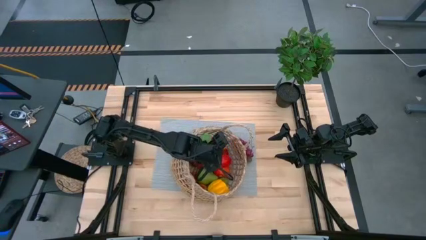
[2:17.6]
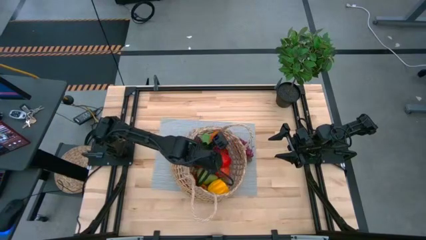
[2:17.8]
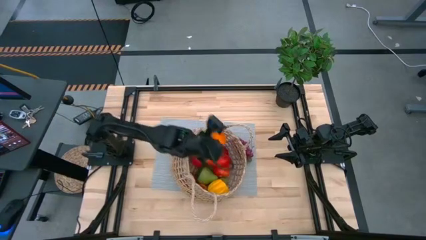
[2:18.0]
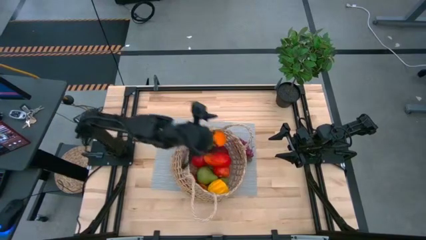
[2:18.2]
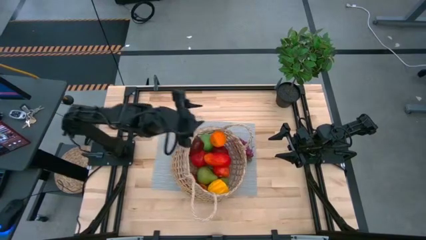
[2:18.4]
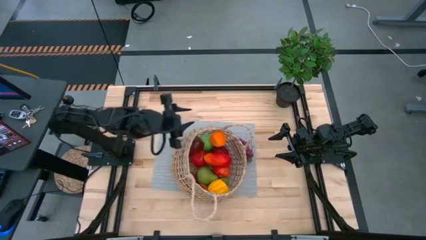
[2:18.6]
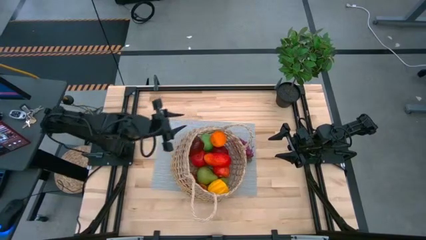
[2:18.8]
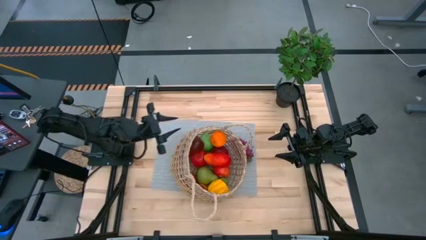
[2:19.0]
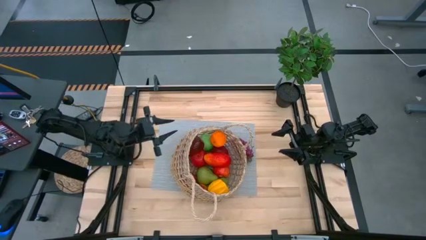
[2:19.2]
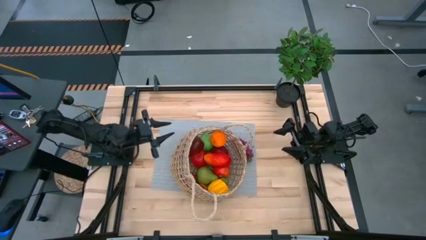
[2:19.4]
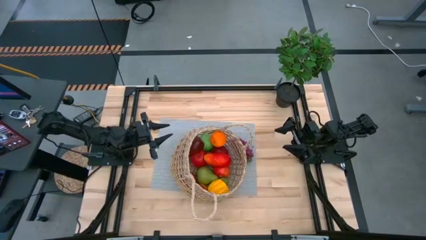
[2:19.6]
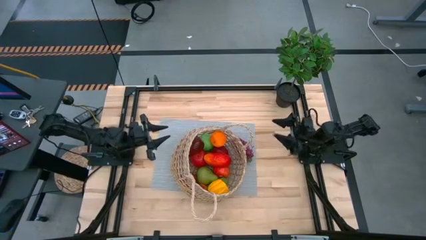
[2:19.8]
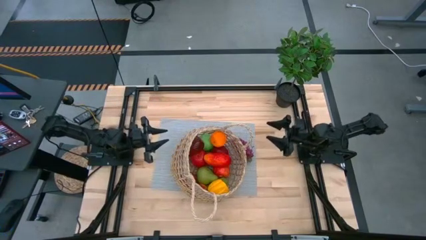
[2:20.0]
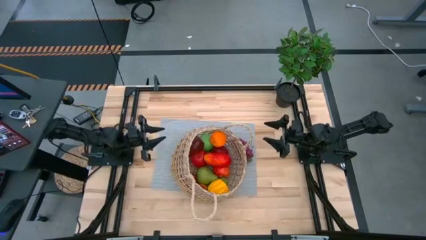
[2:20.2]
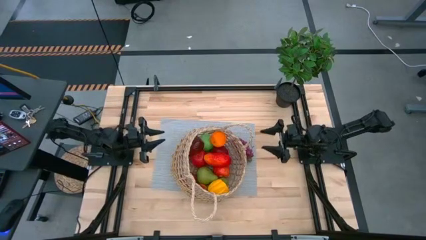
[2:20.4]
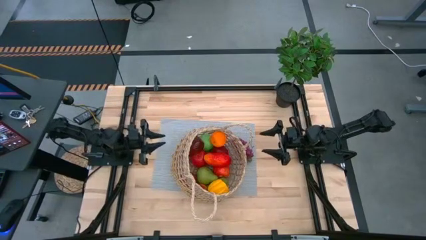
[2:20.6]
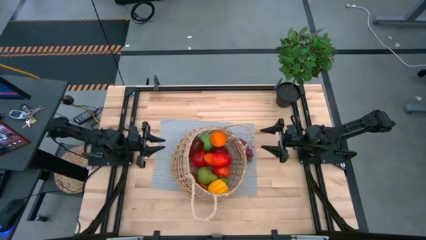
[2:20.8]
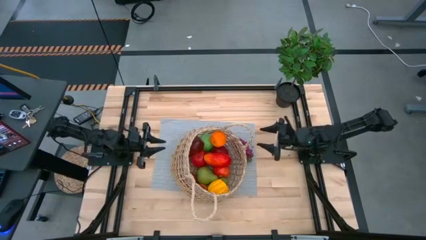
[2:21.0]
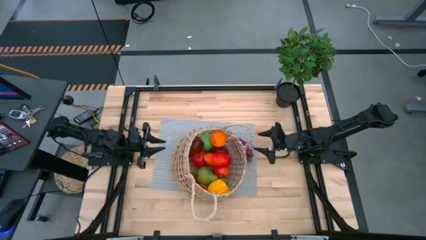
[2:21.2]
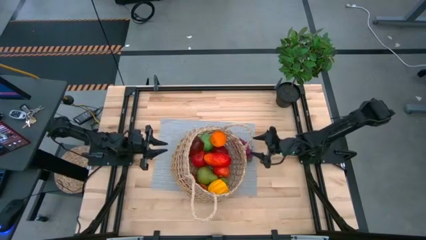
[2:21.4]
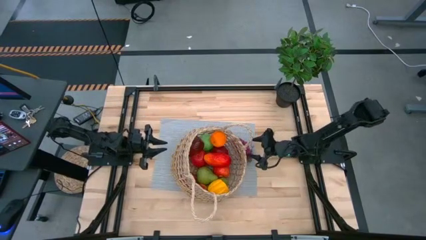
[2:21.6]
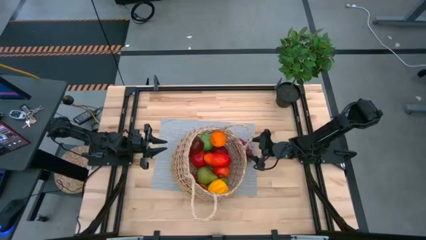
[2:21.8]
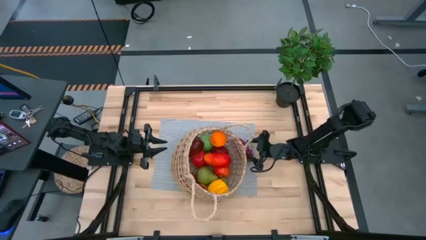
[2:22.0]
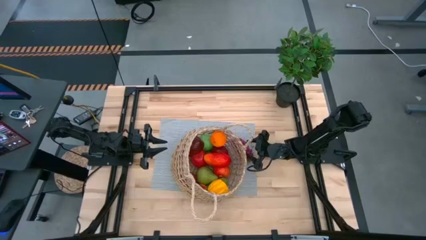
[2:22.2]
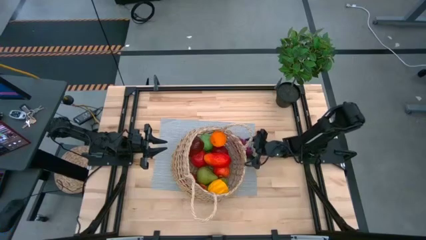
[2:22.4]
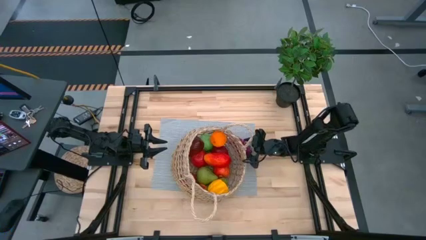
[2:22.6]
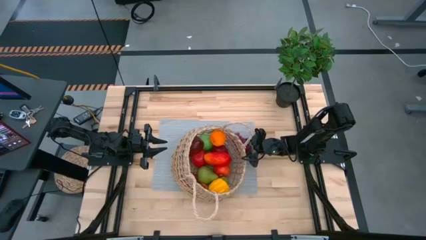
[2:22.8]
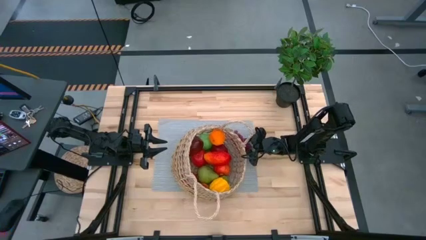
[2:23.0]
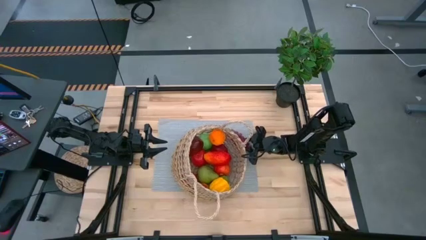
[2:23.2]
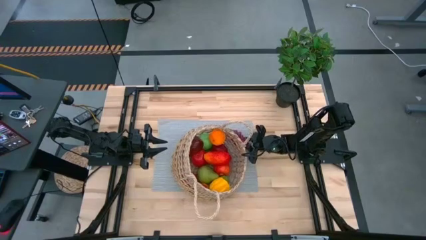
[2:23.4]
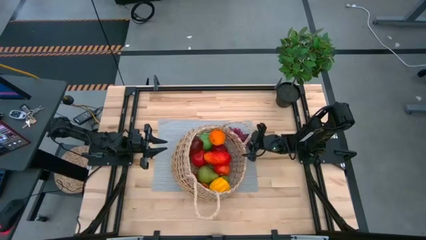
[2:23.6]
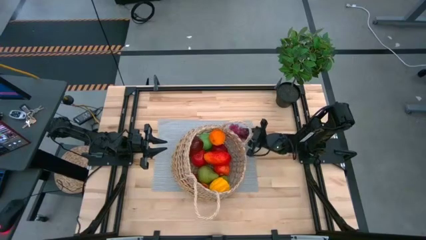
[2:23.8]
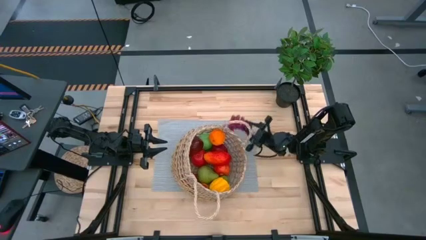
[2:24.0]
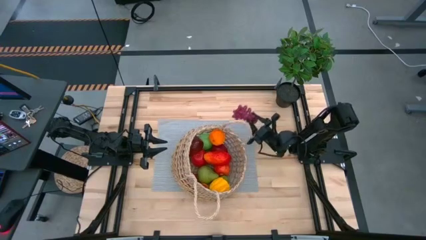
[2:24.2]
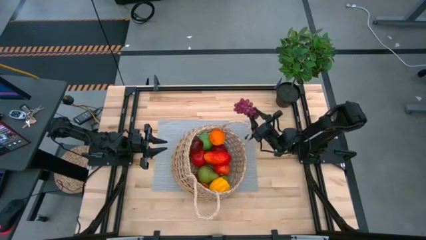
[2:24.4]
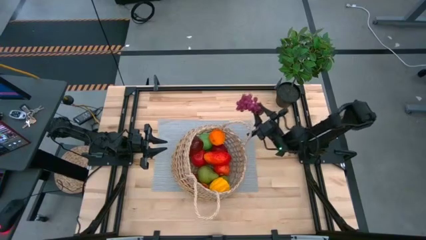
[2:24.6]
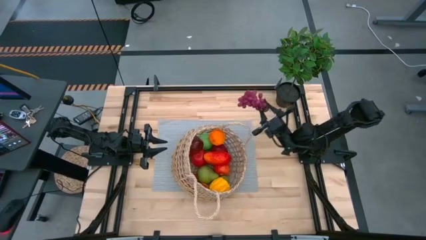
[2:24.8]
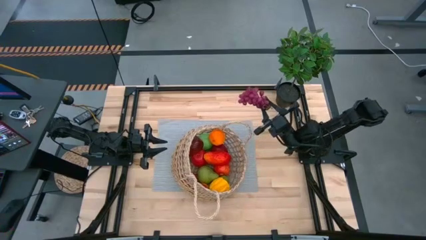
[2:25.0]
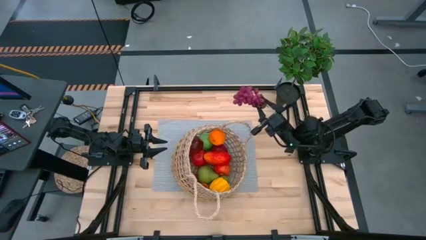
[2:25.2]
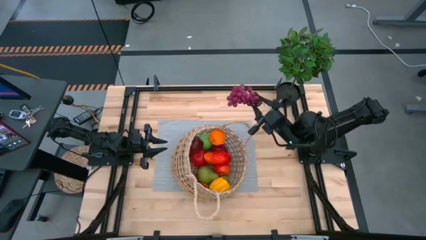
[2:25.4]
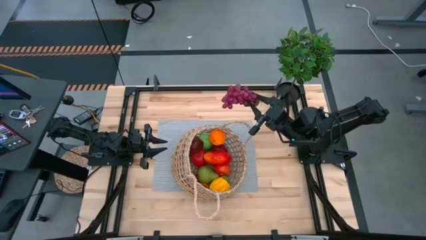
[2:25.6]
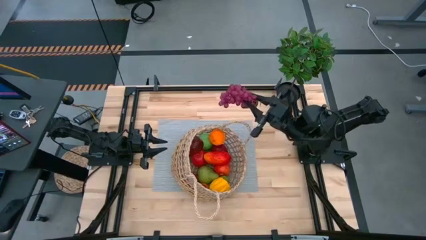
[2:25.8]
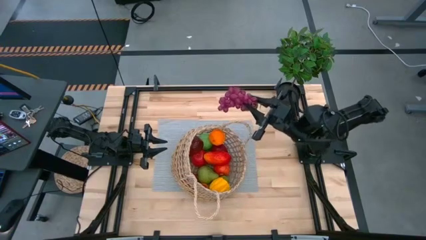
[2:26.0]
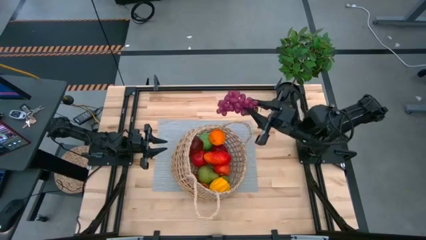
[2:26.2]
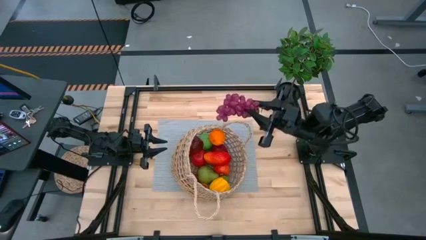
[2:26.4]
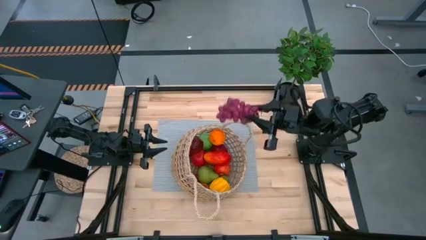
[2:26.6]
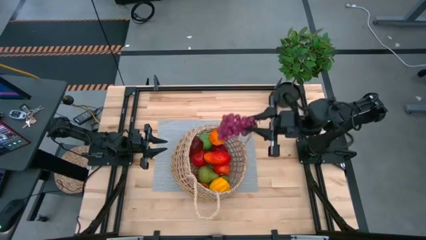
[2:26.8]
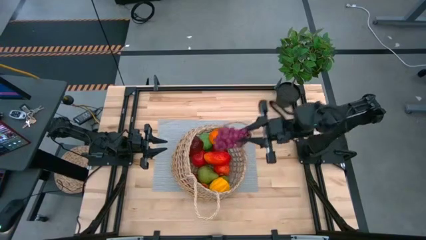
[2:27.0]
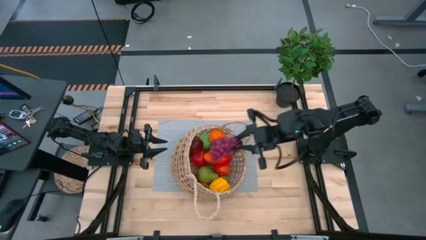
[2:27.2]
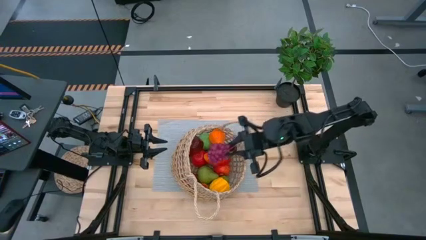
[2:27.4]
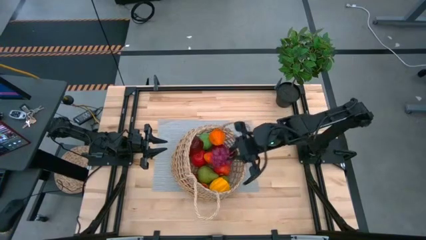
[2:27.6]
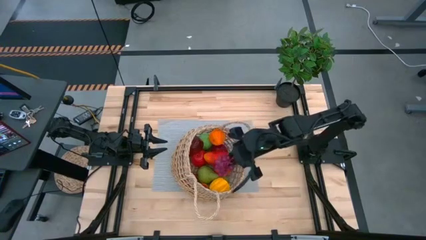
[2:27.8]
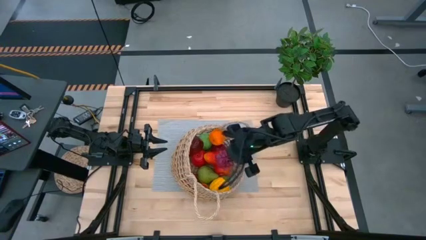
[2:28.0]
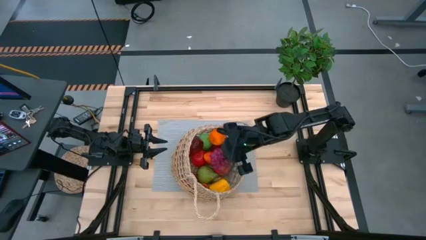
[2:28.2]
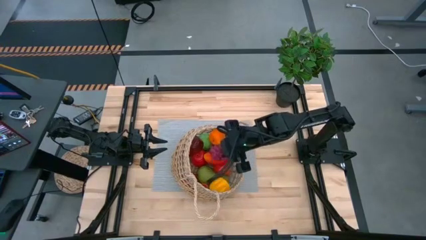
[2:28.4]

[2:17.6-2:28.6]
Task: Build produce basket
Put the grapes into the basket

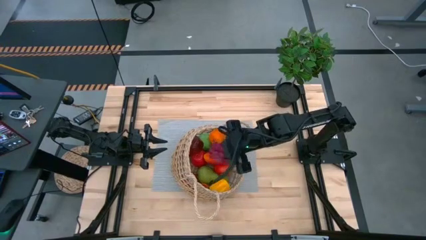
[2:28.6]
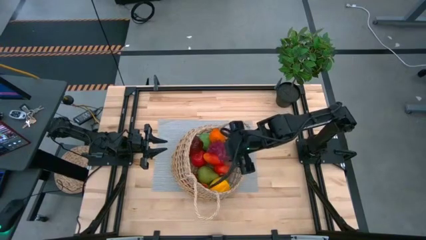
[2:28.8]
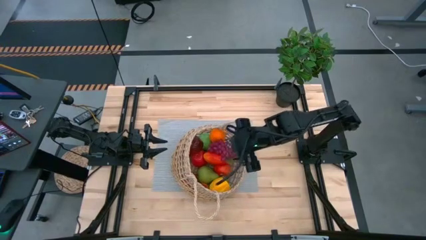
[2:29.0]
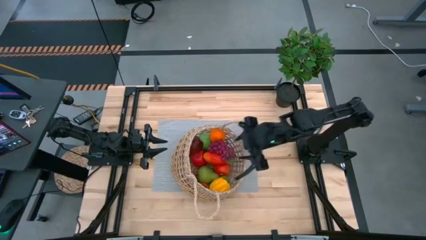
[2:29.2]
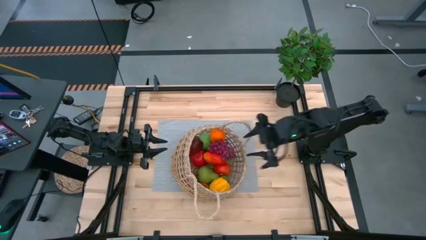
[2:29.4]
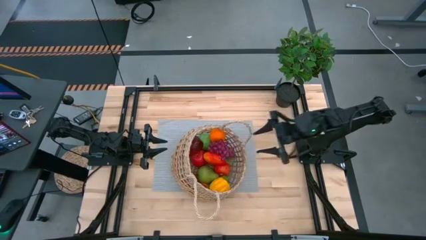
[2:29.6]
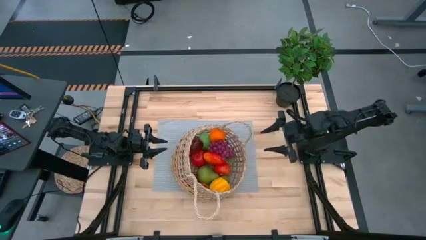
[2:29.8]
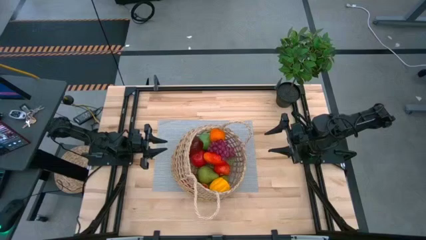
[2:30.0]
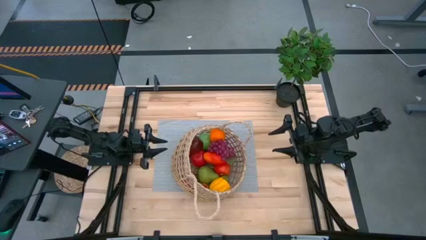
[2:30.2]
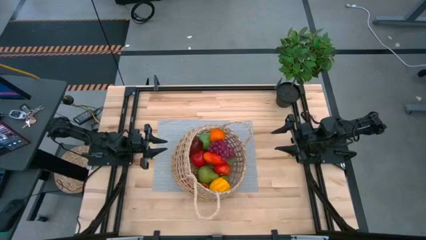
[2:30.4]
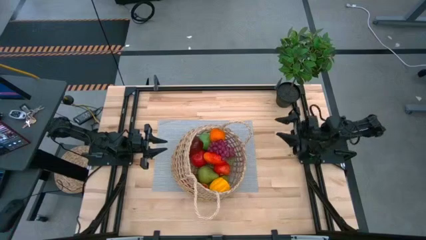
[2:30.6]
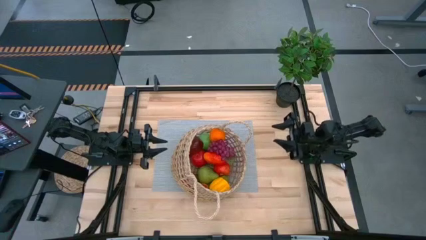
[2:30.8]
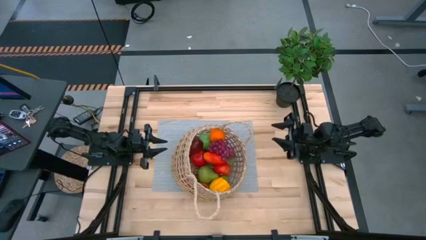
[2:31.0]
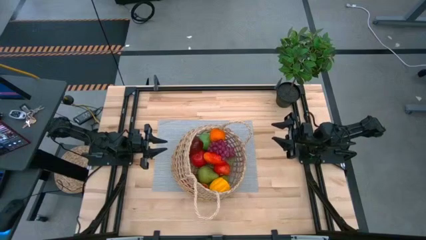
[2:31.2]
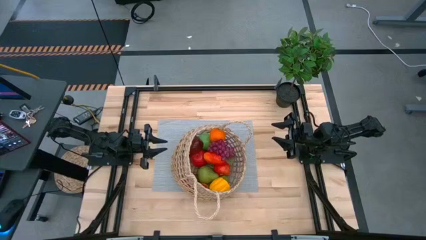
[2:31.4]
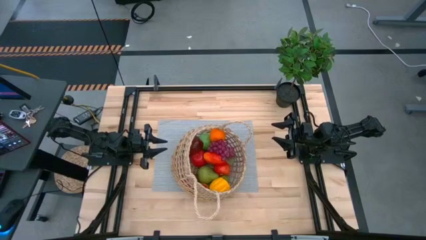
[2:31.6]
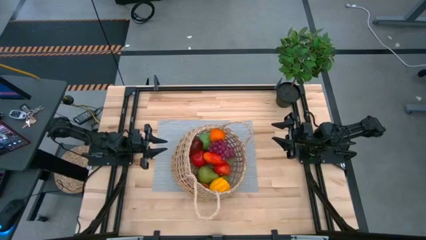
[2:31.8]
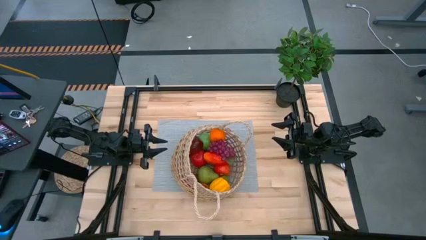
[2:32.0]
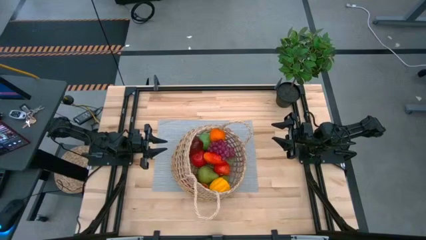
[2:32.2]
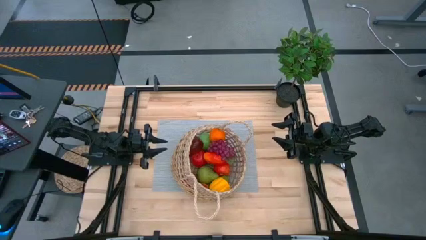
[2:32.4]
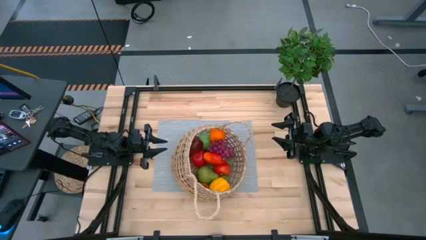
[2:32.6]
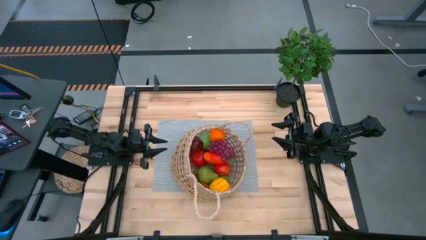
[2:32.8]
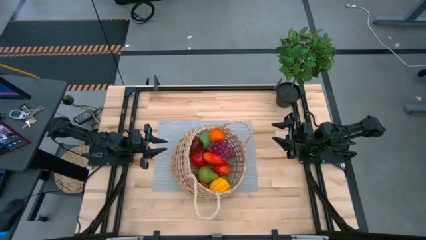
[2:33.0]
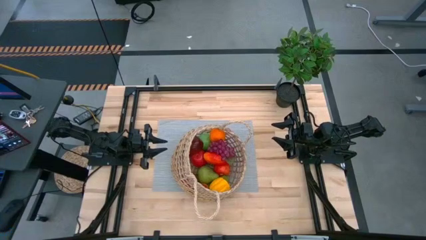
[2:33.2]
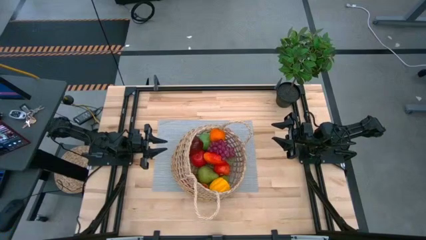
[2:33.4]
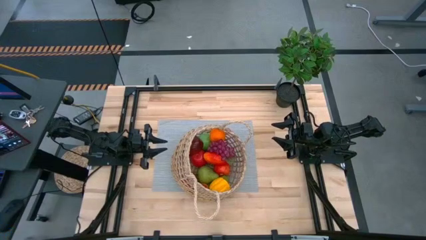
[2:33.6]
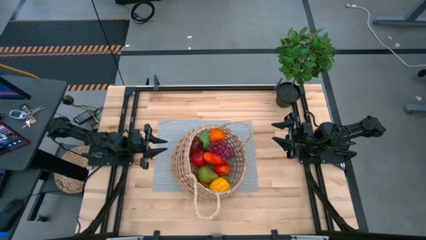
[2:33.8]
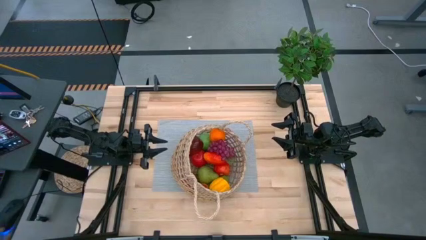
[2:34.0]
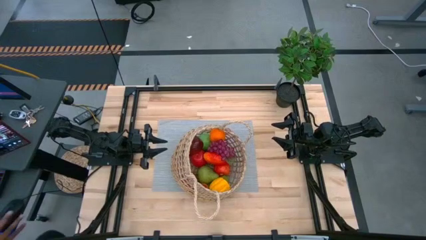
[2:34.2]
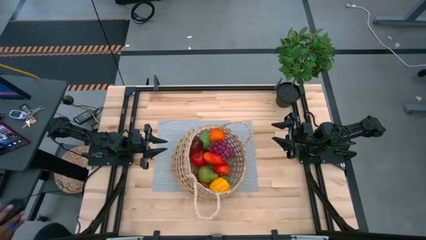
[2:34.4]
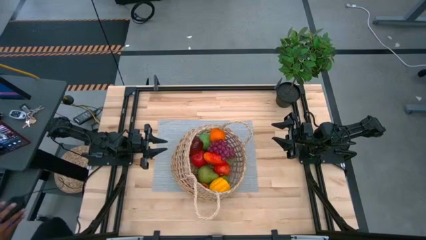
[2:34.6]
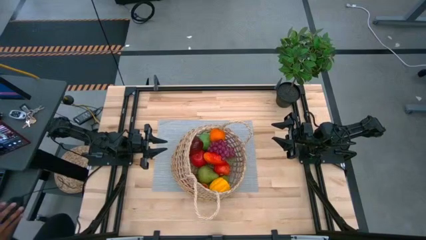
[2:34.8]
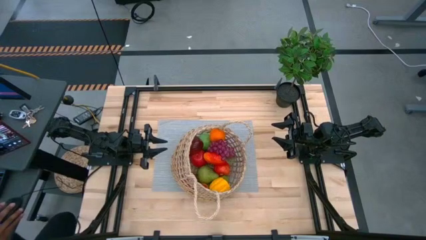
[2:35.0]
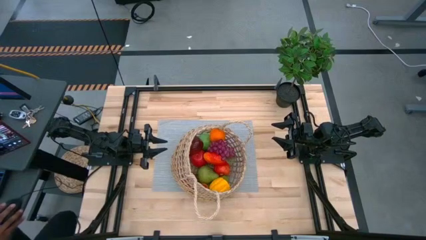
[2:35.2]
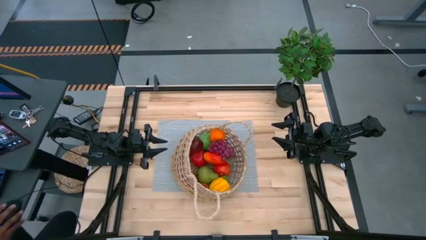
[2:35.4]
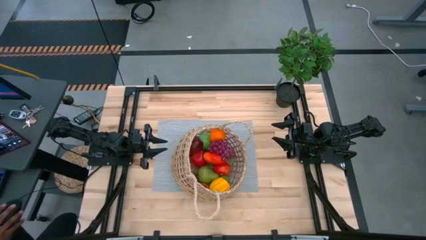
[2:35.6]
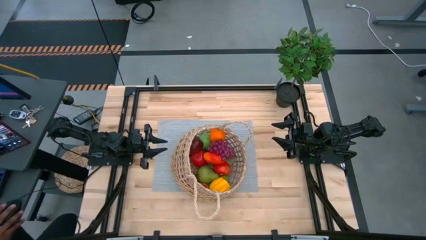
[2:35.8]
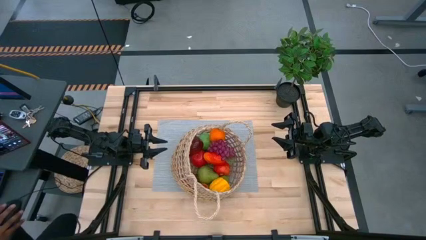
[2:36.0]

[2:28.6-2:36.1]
Return to Home Position
